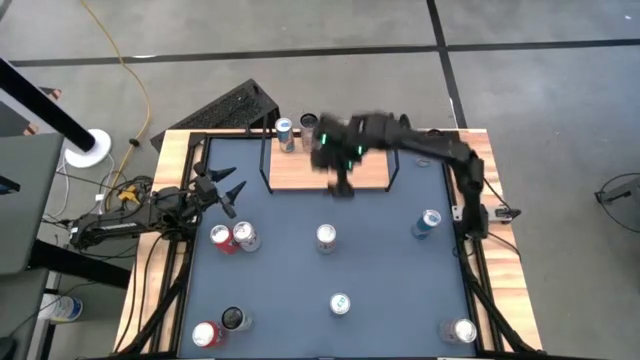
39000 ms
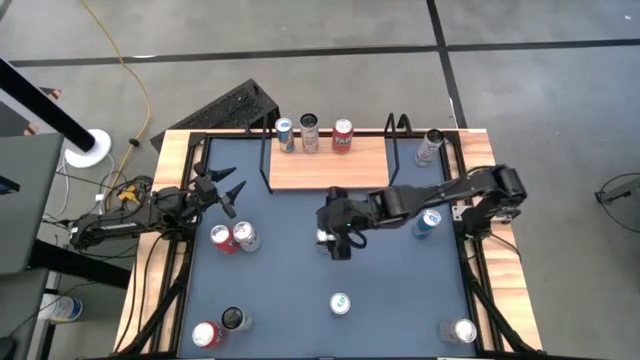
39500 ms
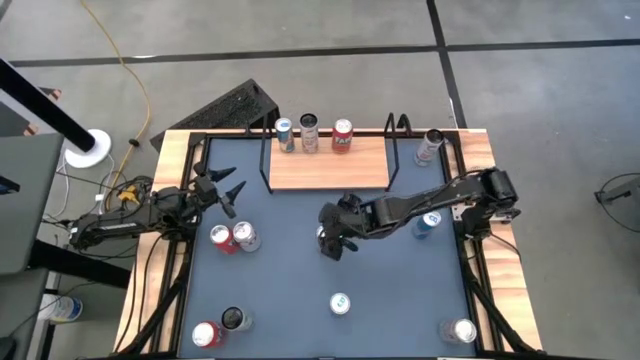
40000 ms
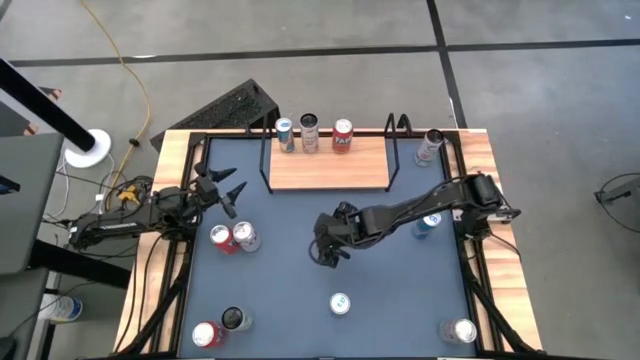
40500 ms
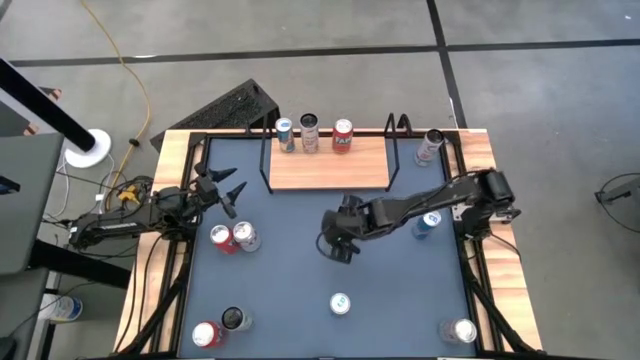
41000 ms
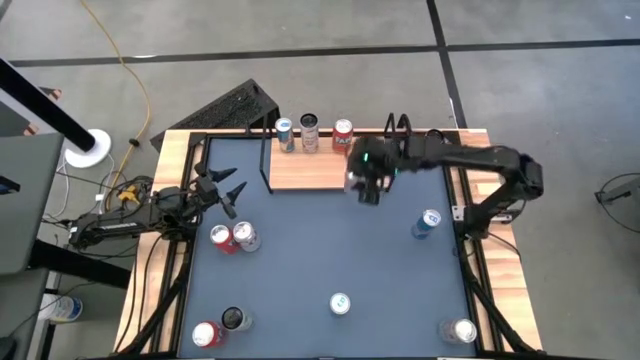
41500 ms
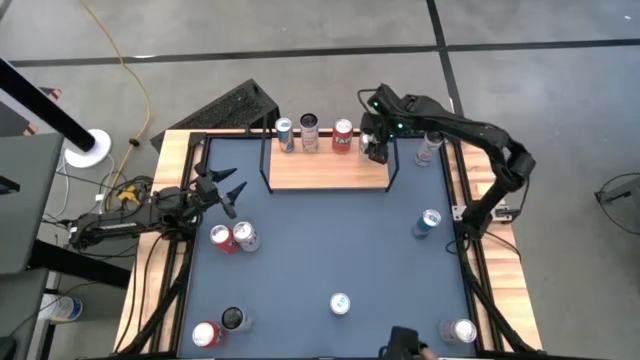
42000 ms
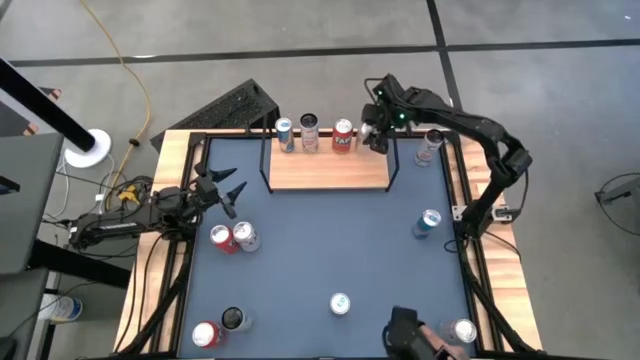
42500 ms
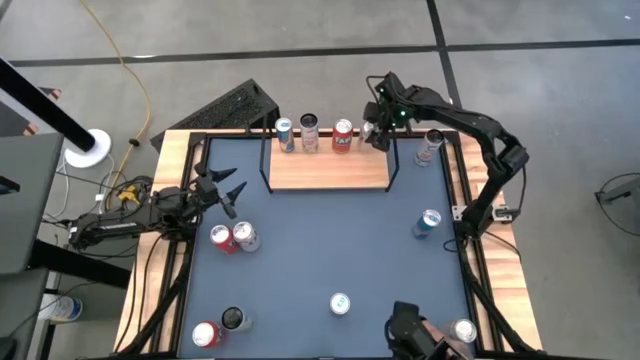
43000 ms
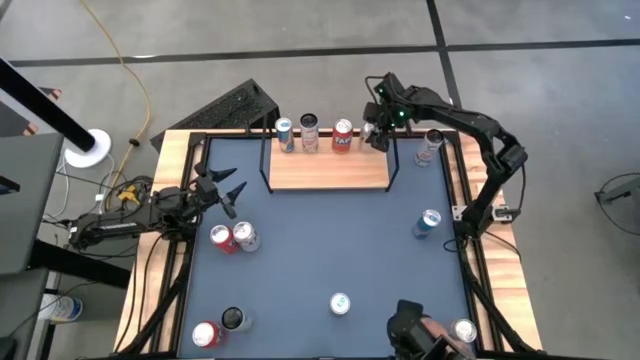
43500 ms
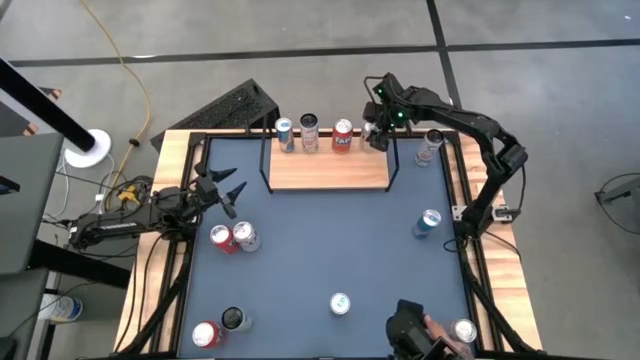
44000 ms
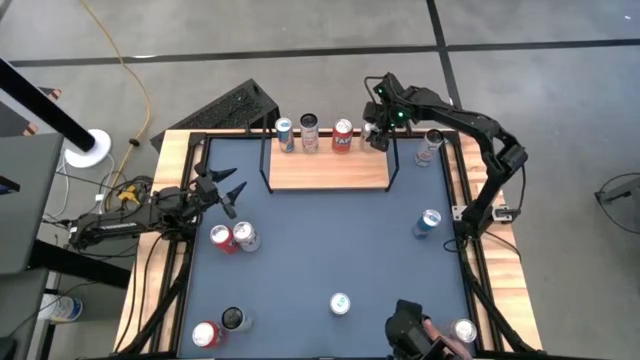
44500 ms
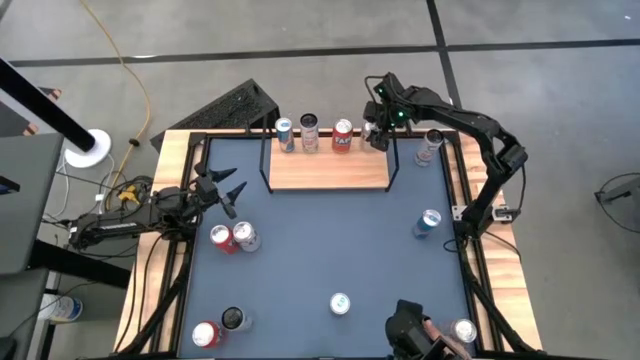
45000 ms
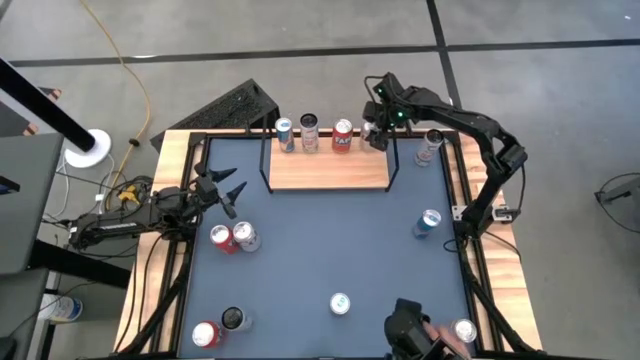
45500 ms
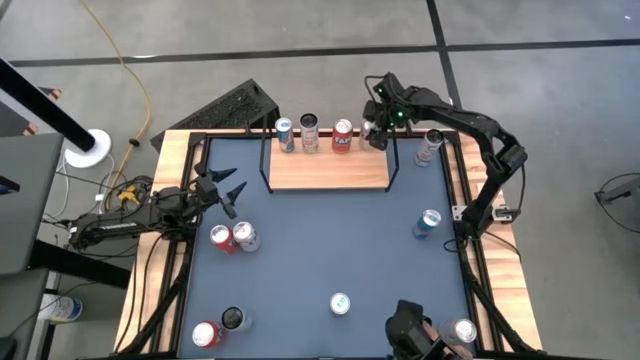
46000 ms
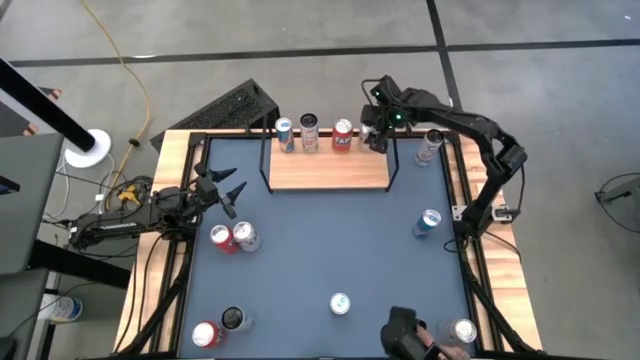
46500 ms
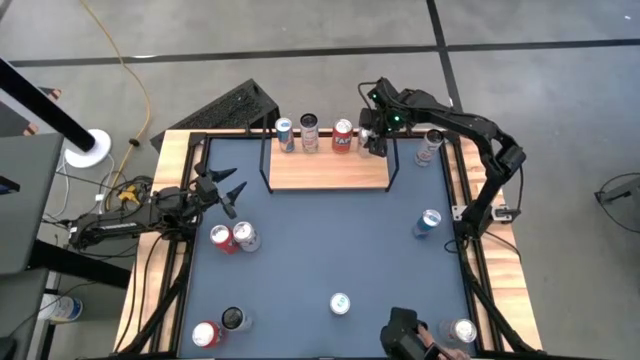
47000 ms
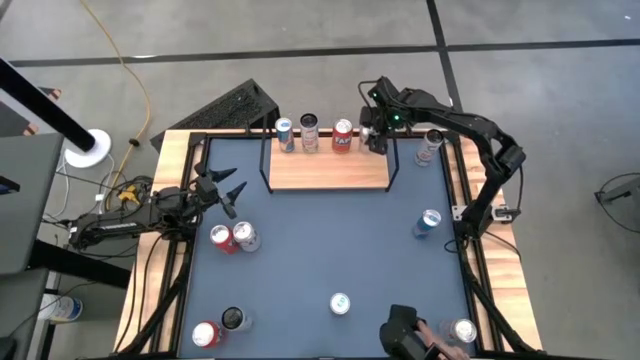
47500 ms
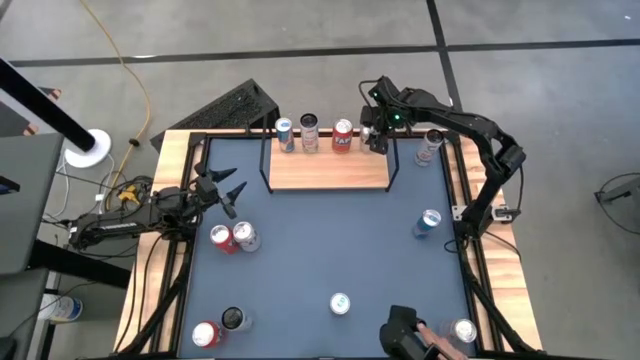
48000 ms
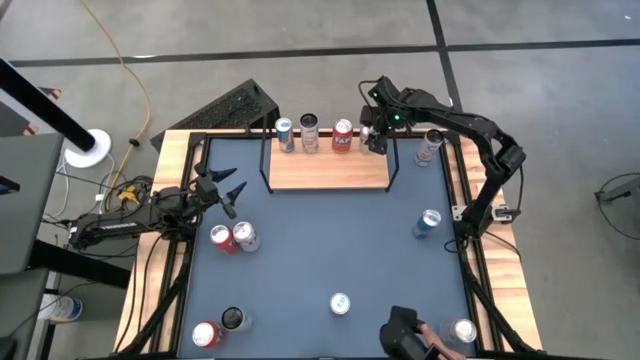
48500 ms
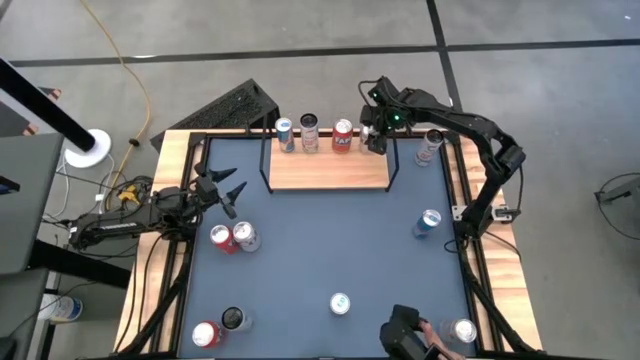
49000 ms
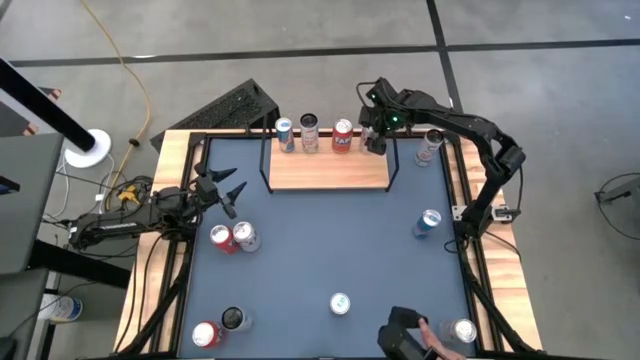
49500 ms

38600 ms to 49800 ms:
Task: Place canned beverage on shelf
Put the top right red-silver soda can on the shelf

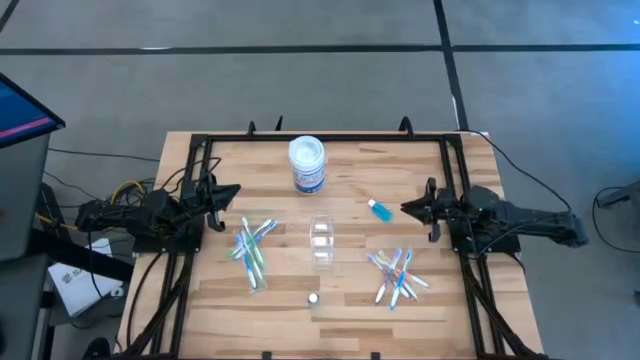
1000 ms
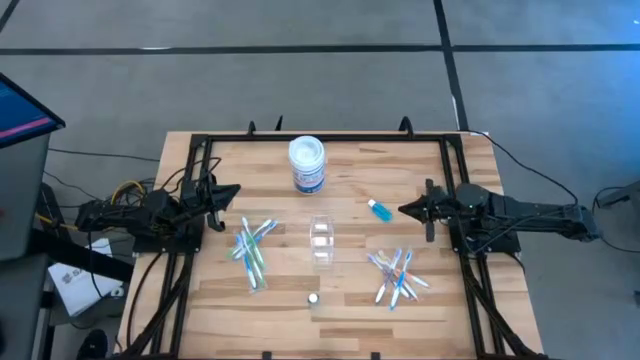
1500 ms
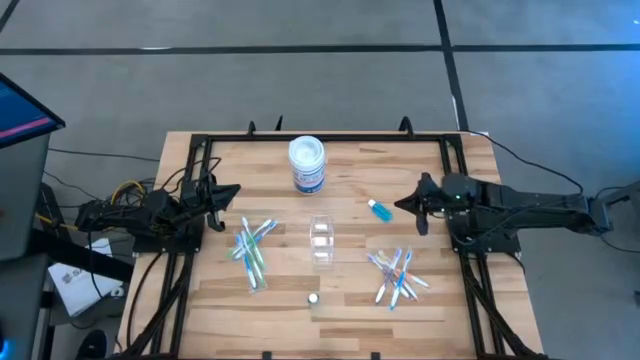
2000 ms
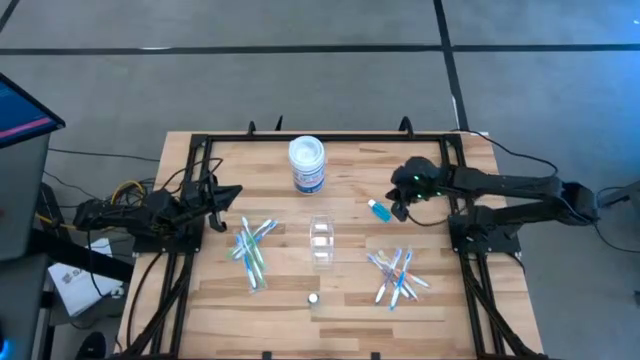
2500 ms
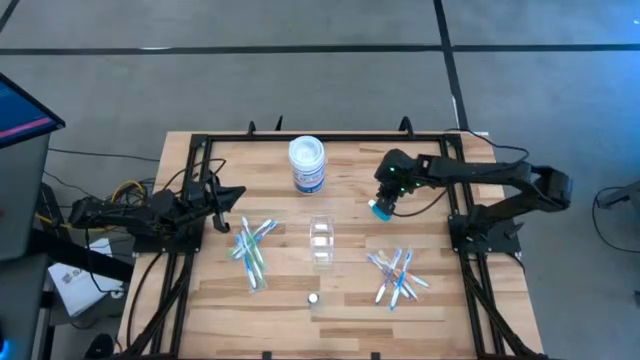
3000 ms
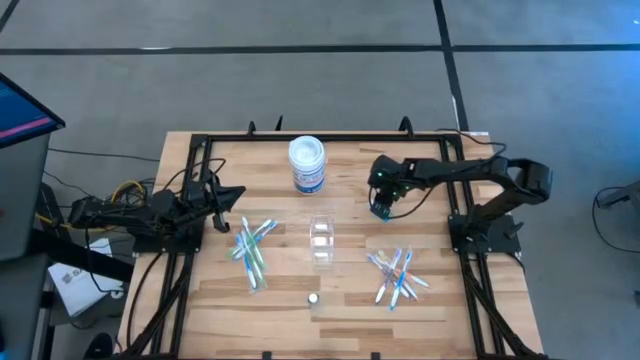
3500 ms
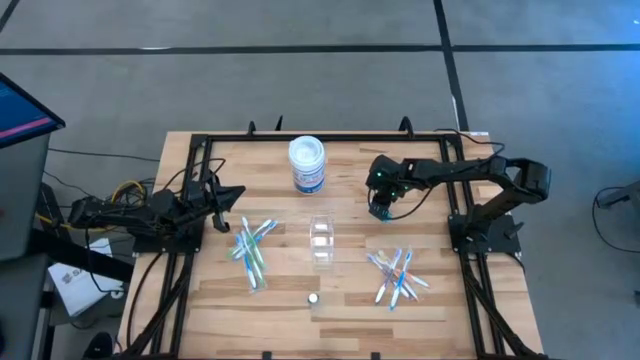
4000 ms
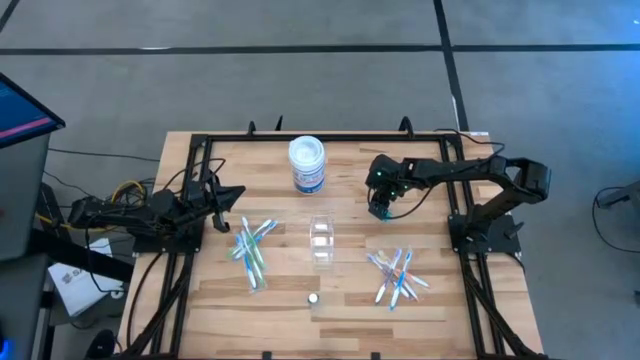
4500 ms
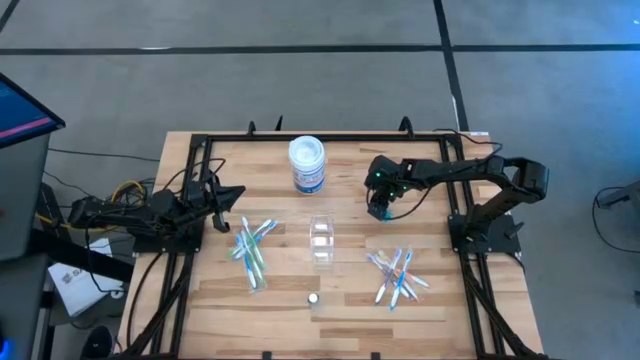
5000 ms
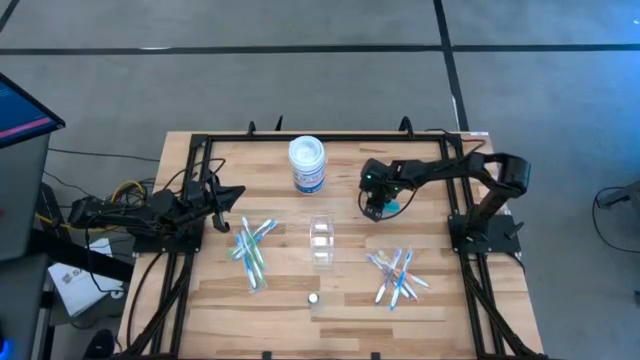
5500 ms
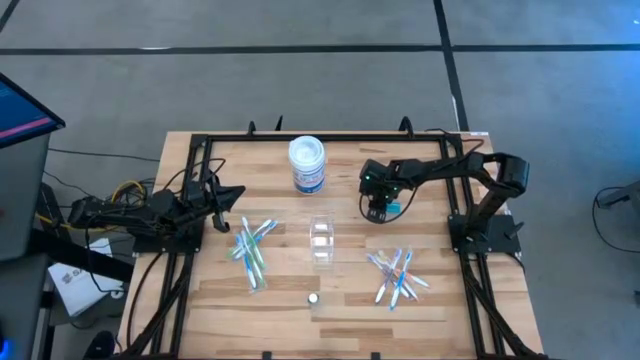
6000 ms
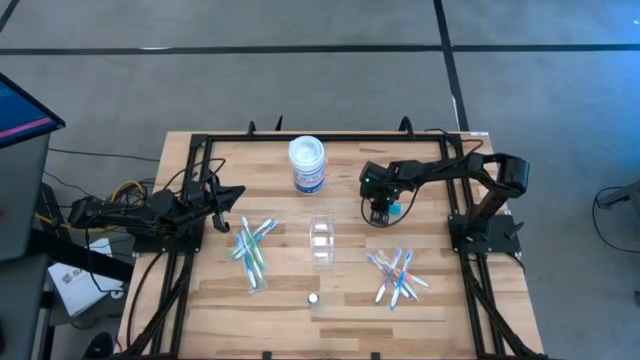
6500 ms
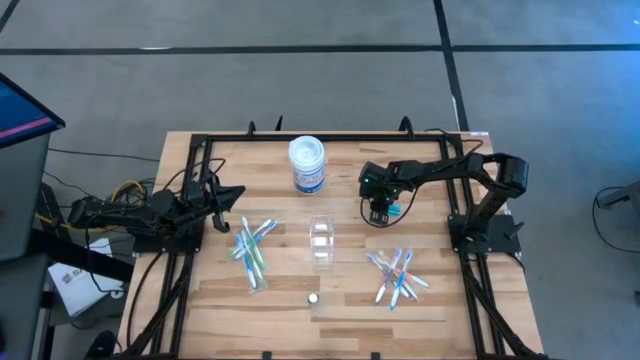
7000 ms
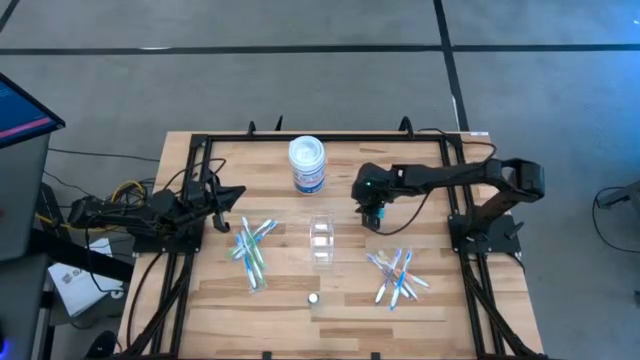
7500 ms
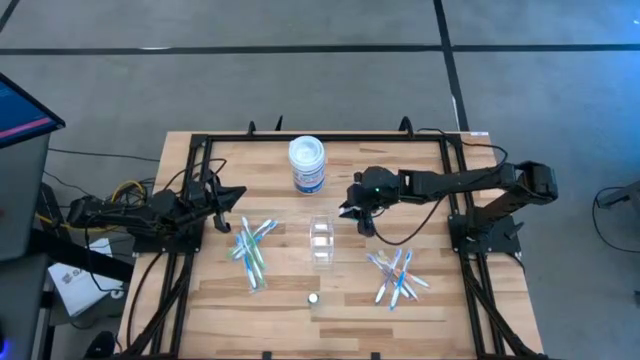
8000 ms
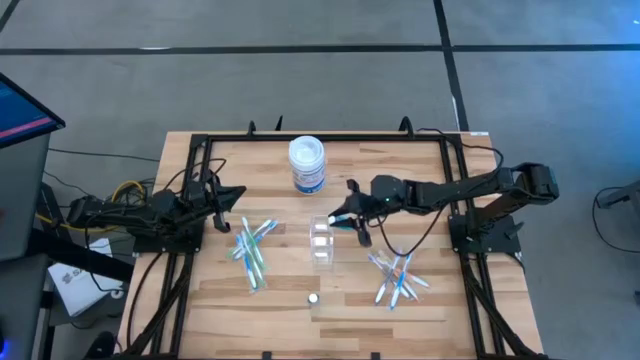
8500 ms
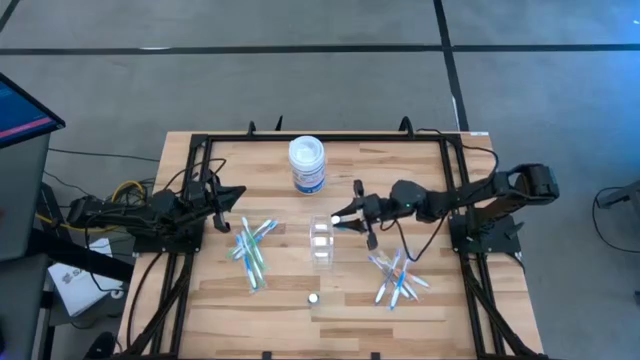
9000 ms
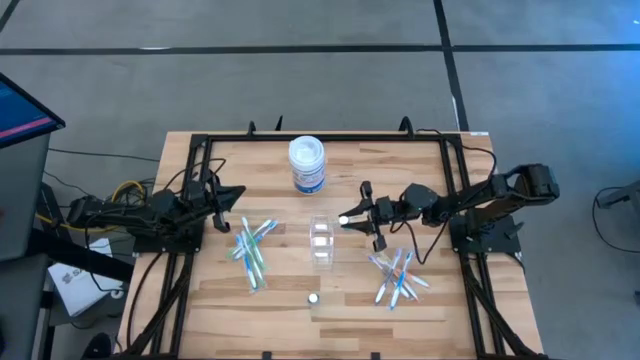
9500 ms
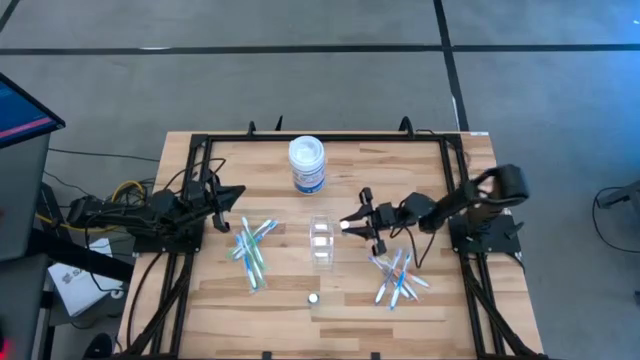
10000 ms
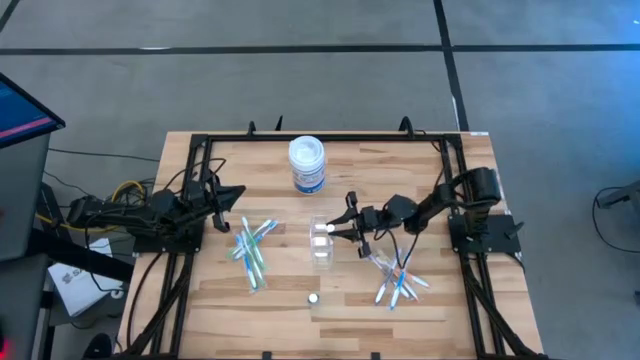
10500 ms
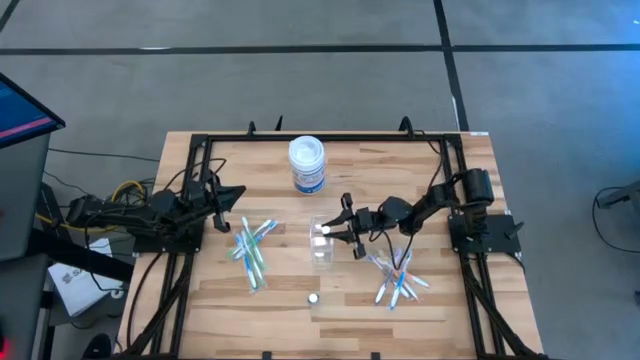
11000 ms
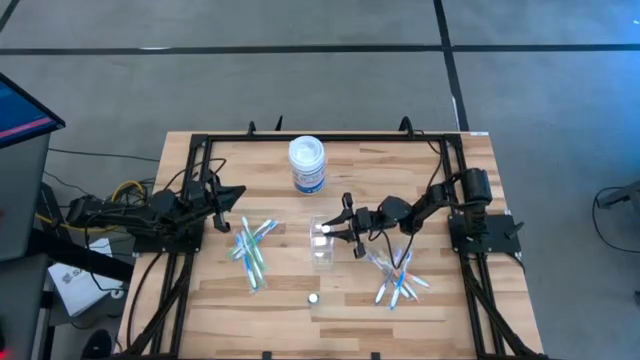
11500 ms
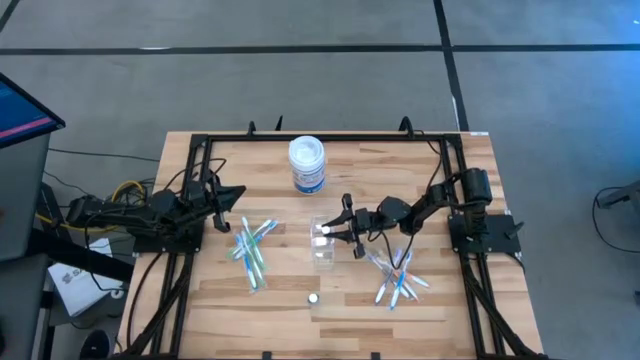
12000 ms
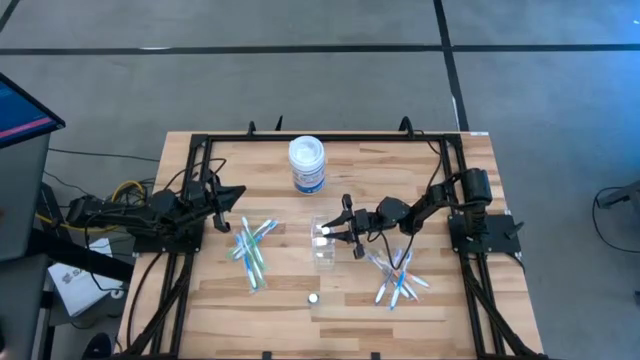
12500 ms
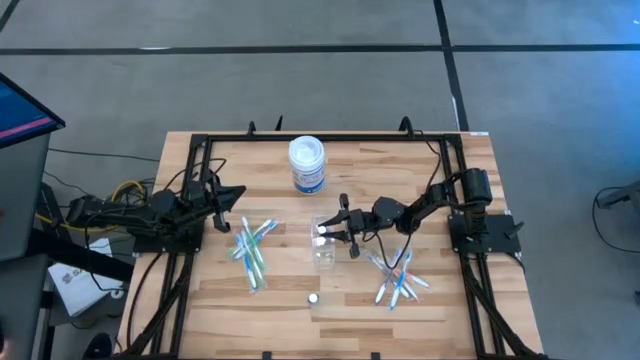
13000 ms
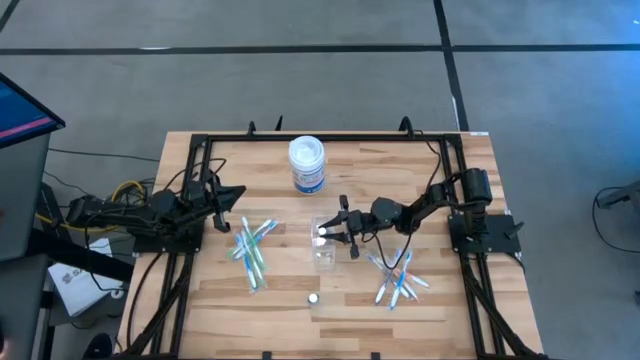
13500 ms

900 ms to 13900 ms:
Task: Pick & Place toothbrushing station
Put the top blue mouthwash into the Transparent organizer
